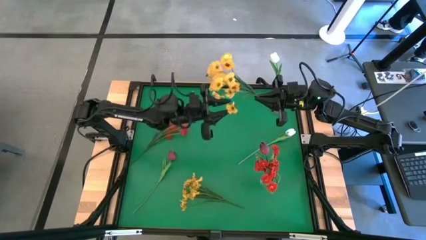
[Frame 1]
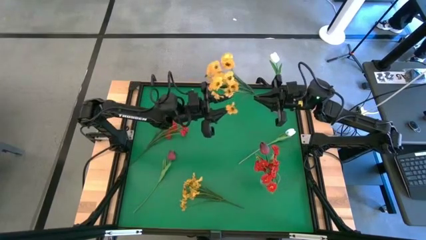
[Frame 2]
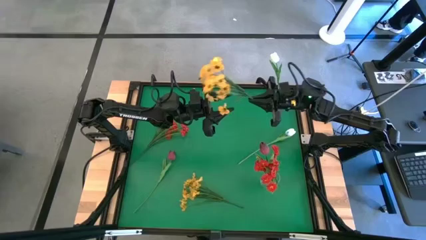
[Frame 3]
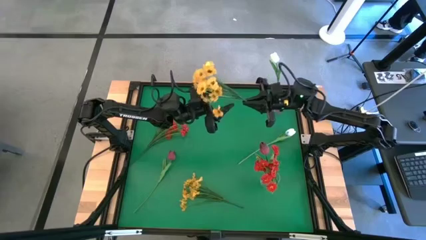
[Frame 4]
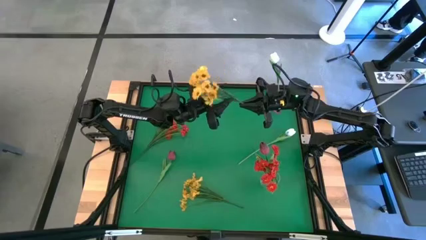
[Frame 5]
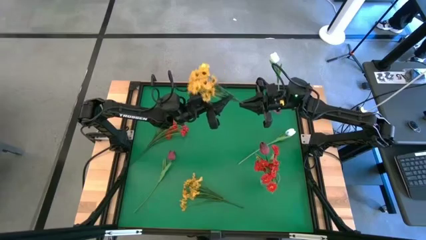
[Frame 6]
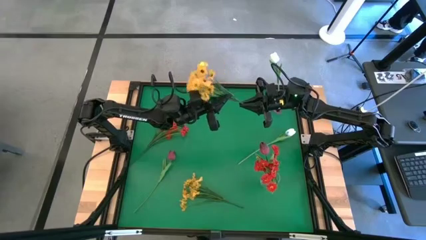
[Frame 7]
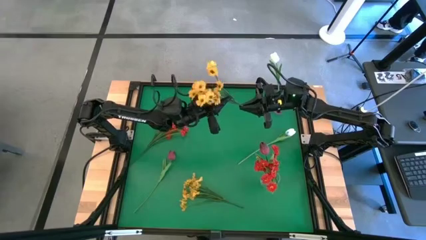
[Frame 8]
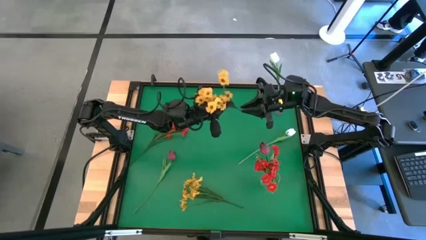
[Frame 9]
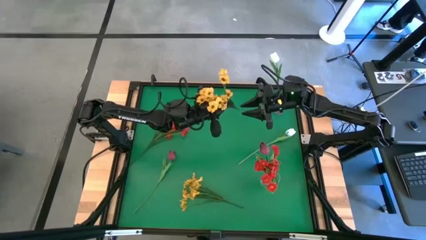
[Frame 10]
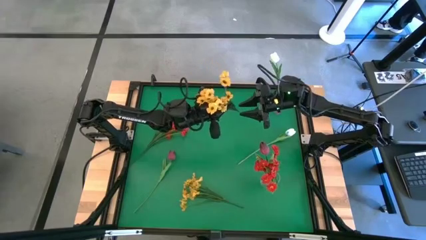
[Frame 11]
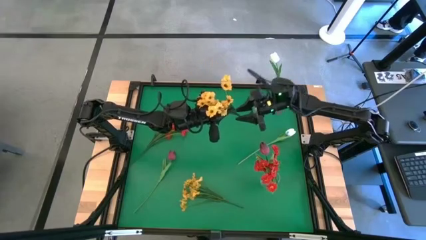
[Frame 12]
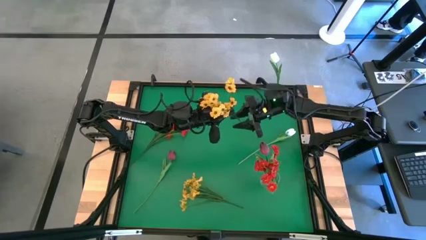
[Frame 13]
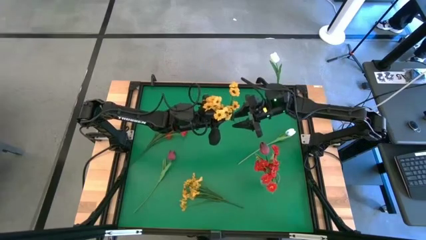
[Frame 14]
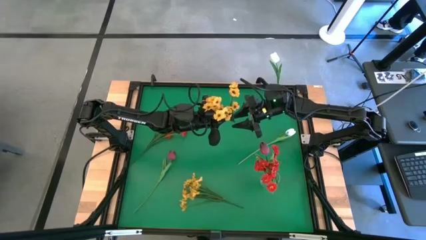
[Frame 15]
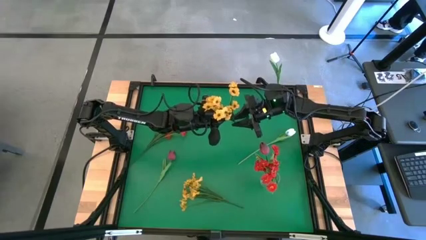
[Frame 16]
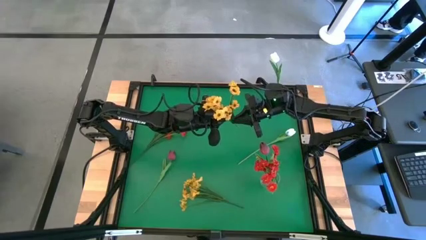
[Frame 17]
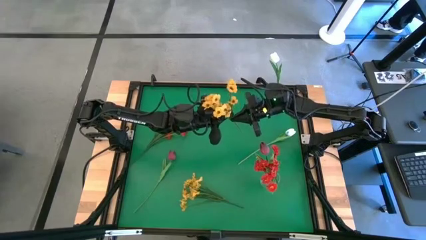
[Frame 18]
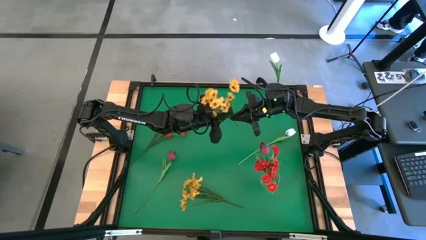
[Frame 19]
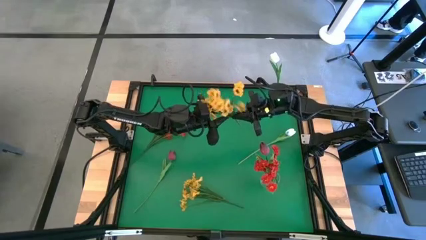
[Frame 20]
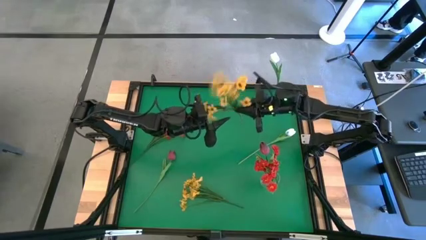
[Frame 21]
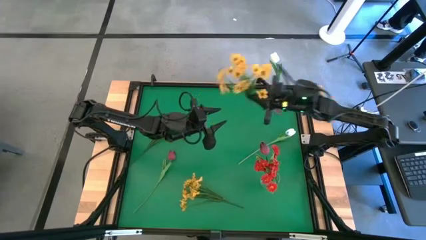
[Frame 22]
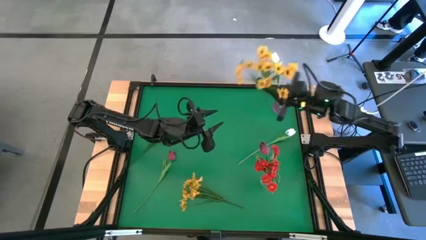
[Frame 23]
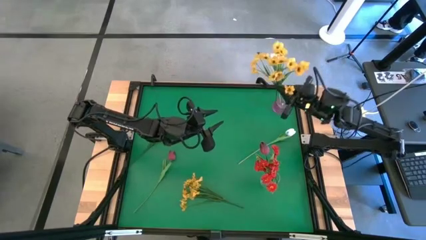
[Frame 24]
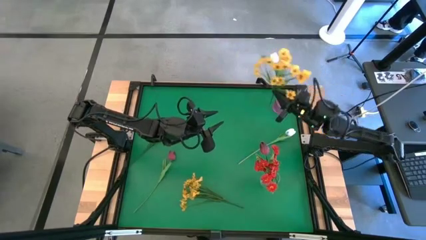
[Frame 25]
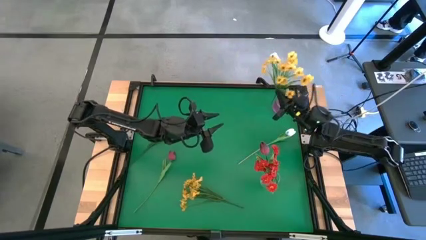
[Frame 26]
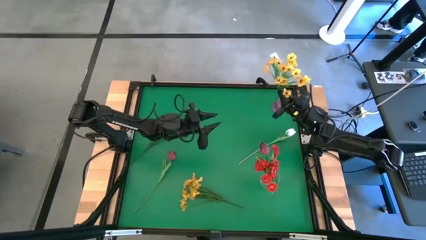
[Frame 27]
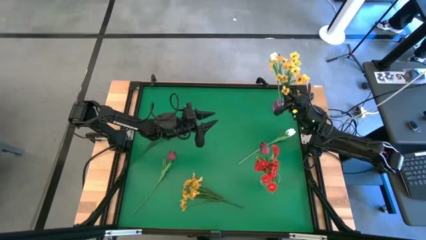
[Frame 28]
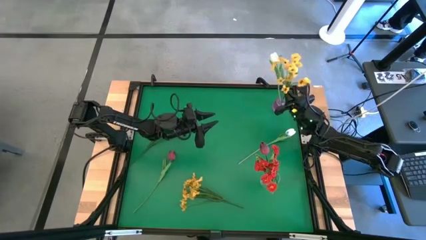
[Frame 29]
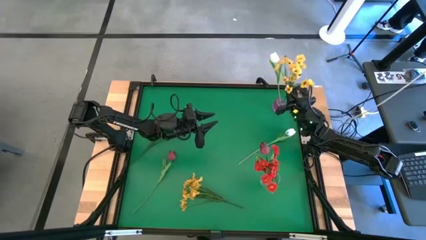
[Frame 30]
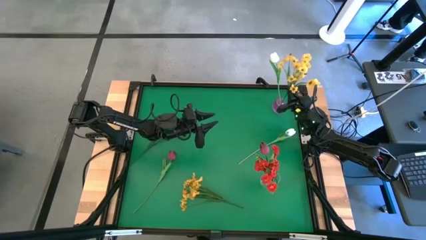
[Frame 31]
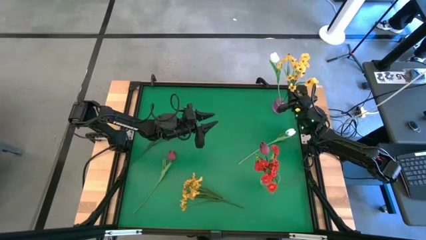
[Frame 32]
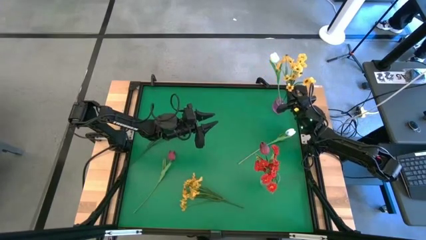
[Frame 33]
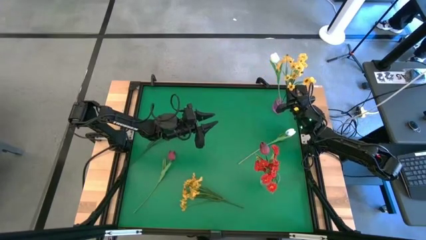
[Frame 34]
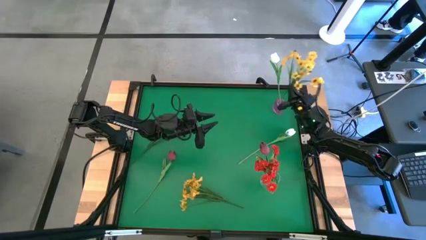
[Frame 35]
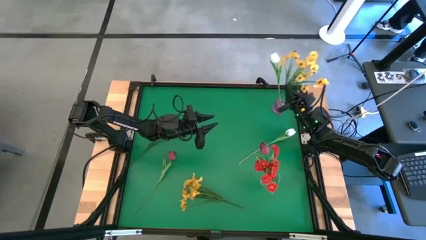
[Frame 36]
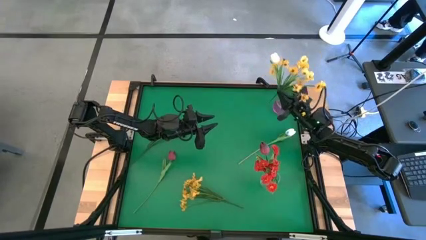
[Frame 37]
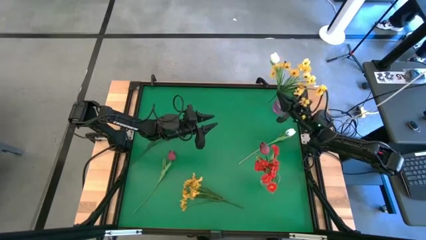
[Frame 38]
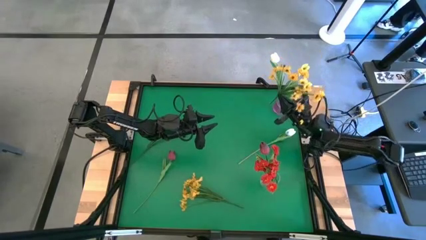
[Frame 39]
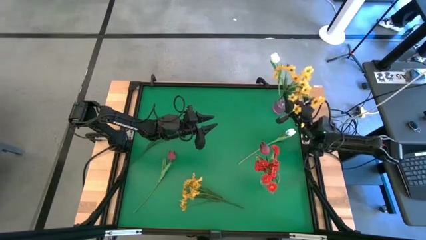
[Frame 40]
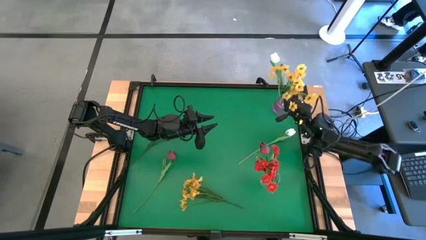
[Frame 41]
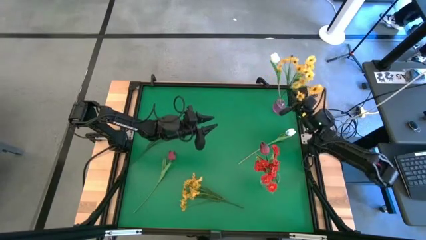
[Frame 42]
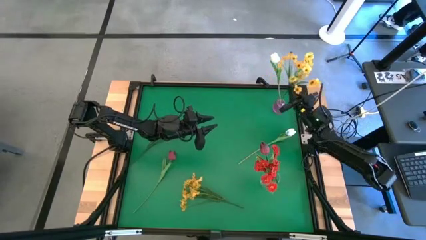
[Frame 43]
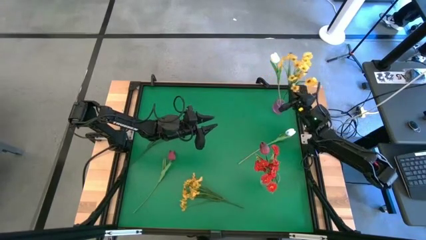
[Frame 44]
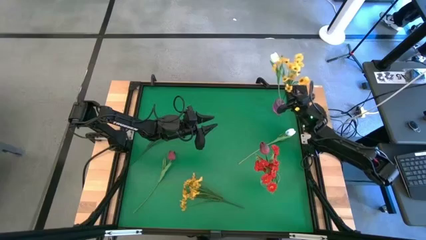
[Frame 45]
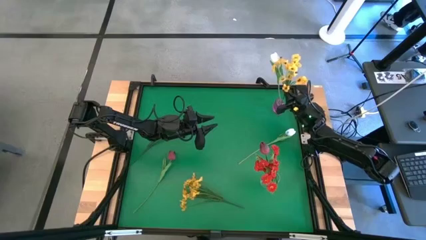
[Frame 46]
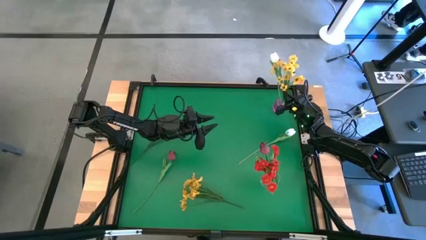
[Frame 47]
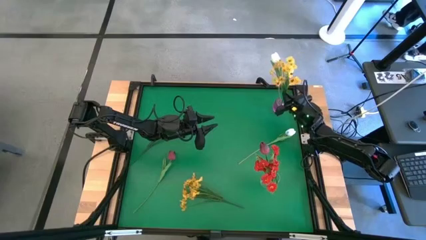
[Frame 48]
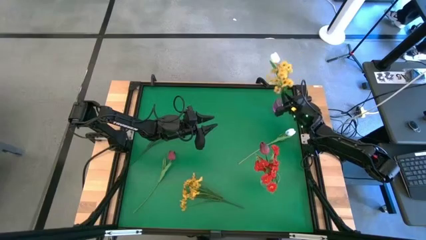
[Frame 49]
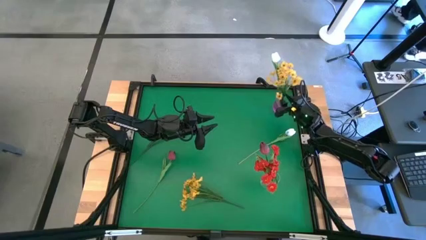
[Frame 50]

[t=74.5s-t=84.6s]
Task: Sort flowers into vase by color
Put the top yellow flowers into the purple vase

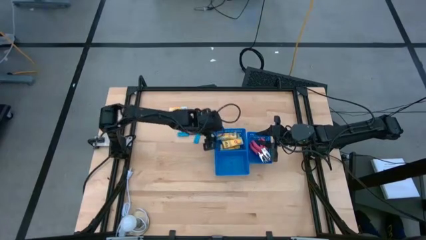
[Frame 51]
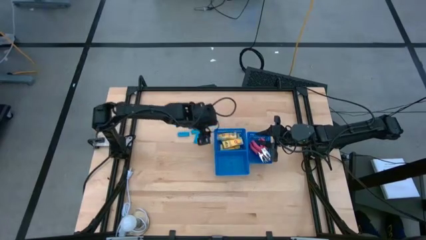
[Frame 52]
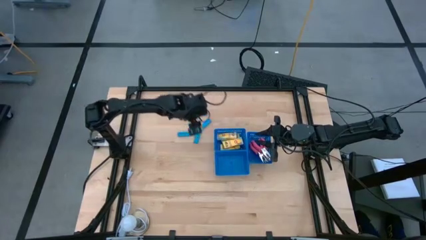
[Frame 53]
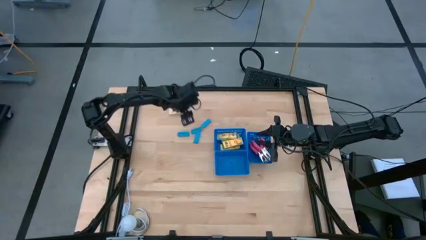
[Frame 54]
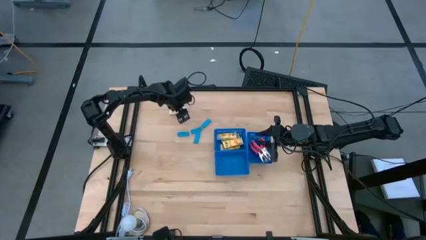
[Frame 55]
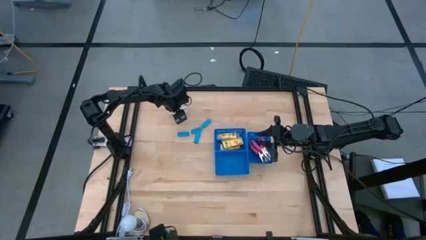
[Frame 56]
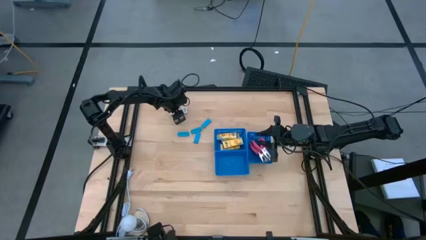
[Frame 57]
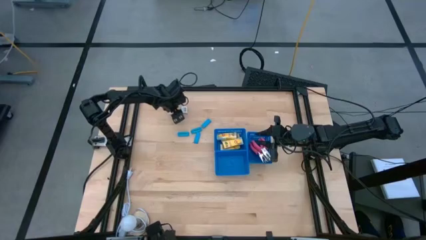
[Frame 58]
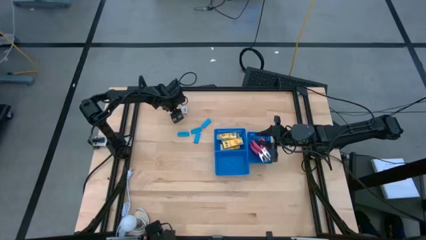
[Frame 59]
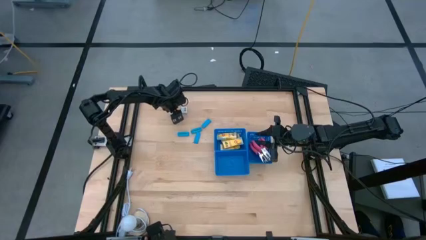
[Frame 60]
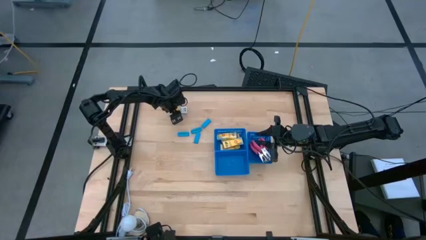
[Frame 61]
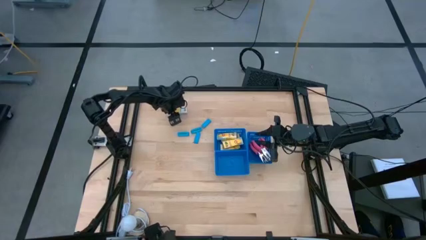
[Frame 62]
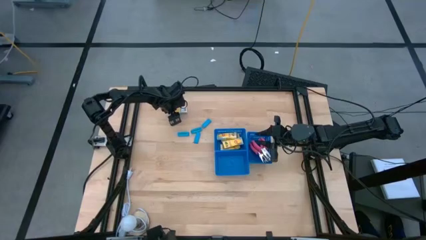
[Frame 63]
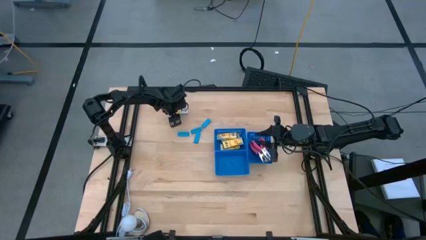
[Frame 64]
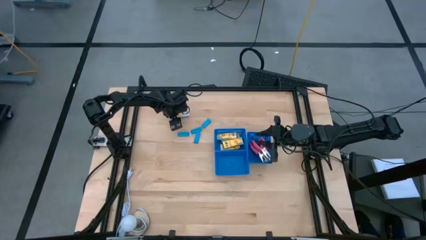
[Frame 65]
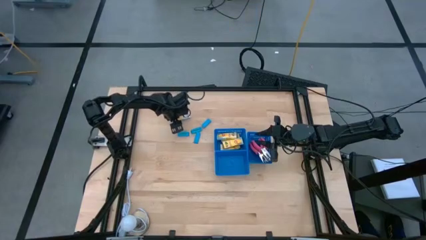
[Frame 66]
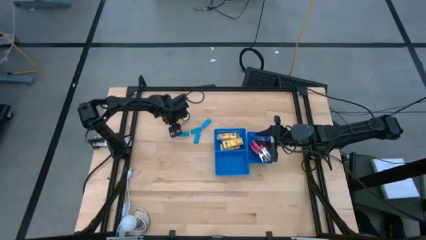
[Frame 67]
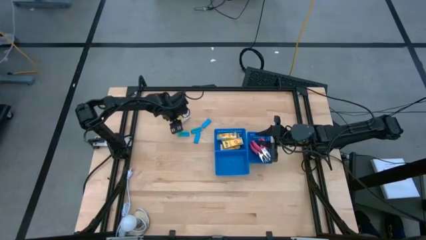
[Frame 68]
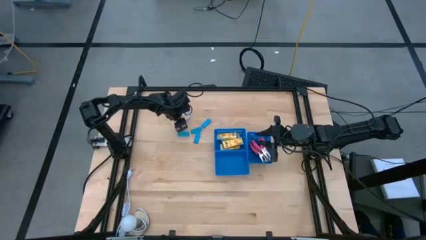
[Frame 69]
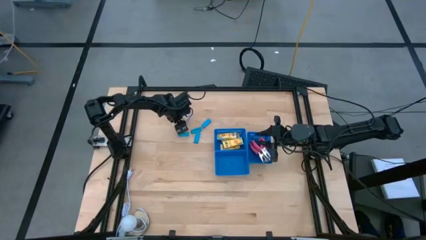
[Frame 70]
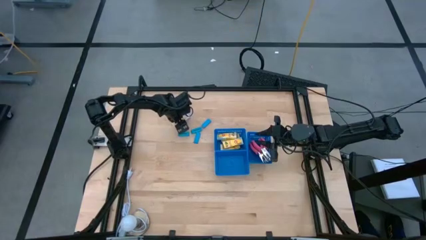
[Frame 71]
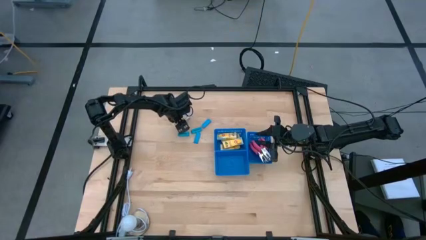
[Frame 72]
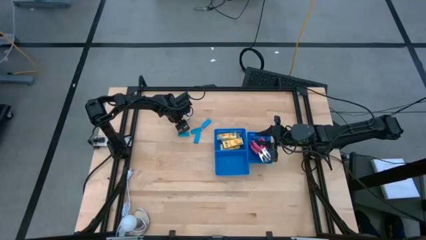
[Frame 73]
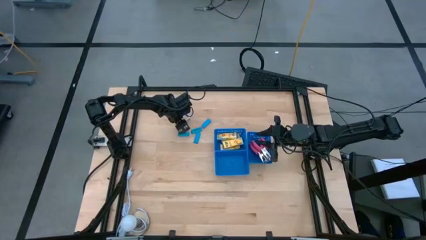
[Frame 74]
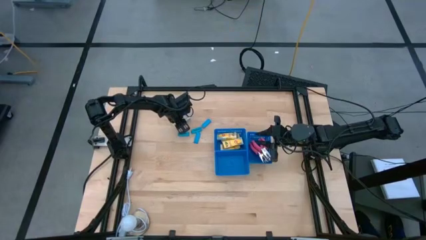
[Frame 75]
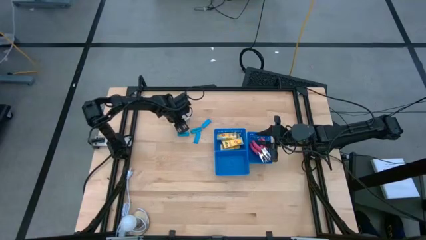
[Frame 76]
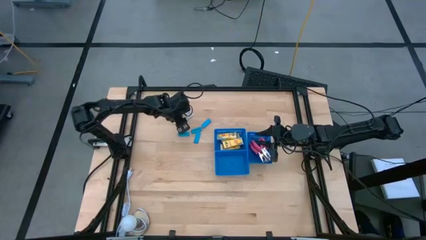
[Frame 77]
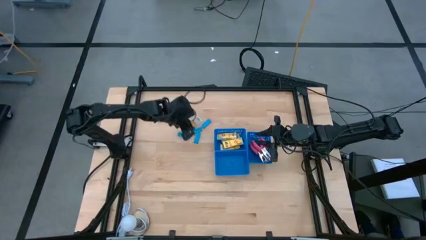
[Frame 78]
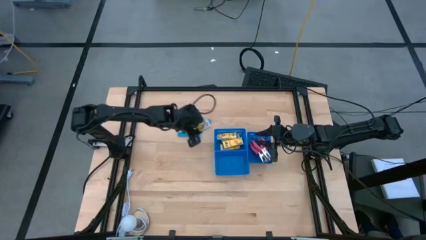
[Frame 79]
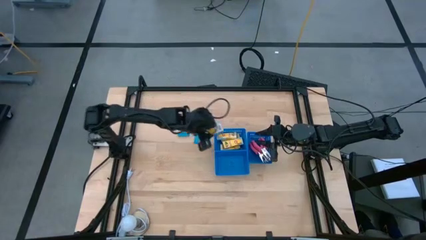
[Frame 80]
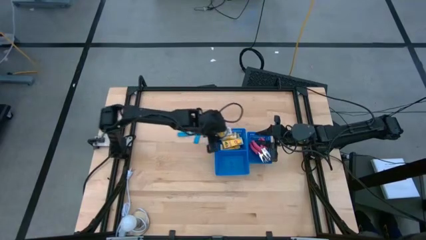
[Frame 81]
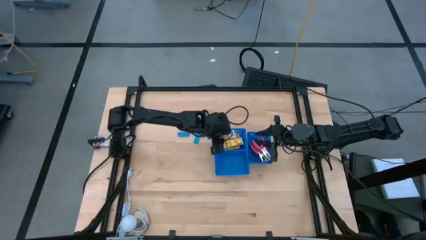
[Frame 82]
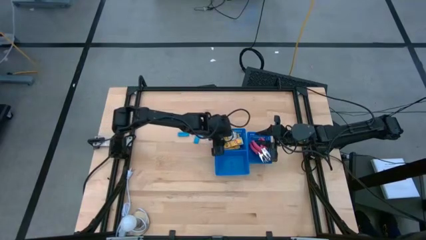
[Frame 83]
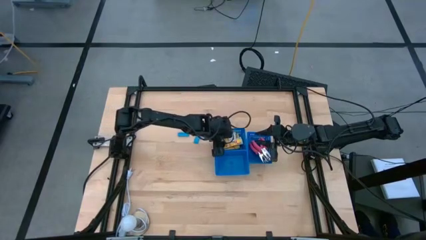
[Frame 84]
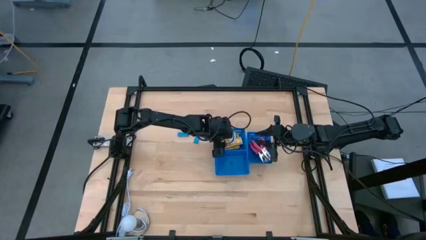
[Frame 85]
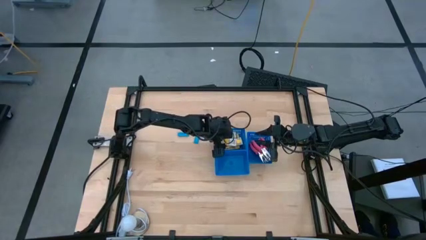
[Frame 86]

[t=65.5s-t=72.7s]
Task: Pick & Place School Supplies
Put the crayon box into the top horizontal blue bin
